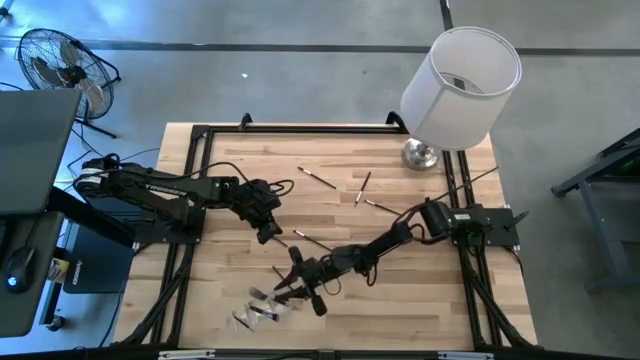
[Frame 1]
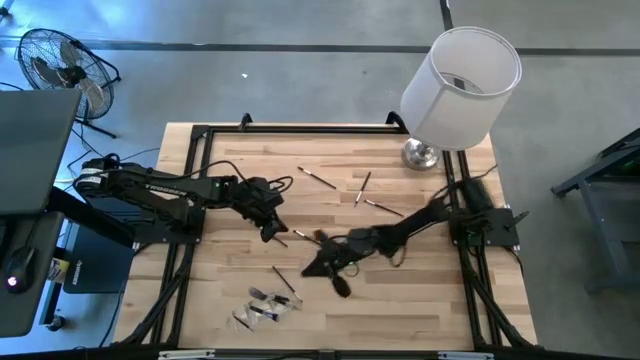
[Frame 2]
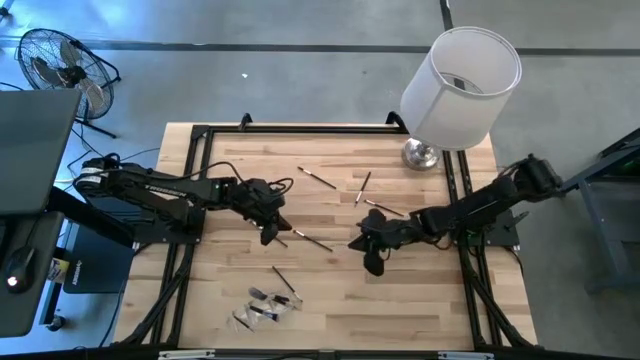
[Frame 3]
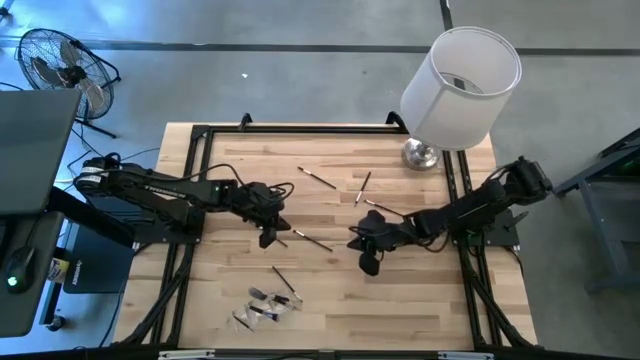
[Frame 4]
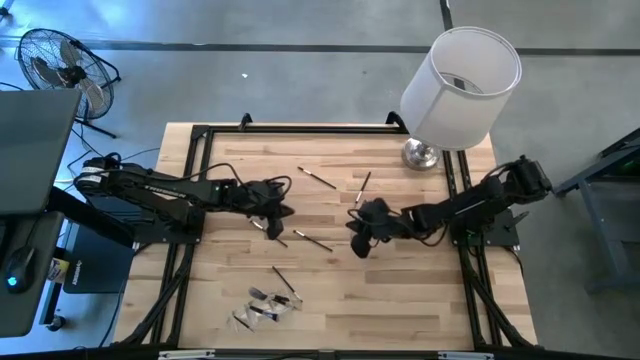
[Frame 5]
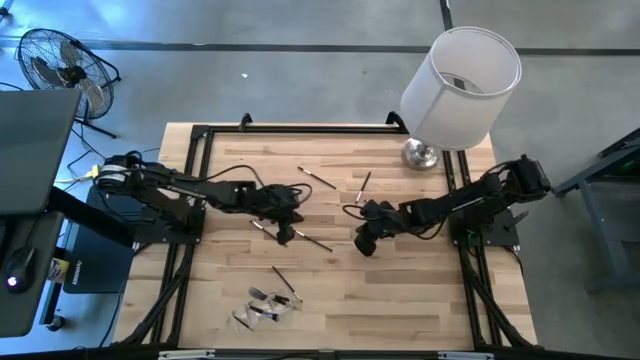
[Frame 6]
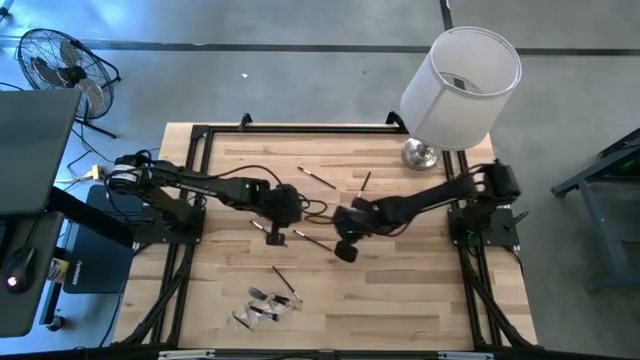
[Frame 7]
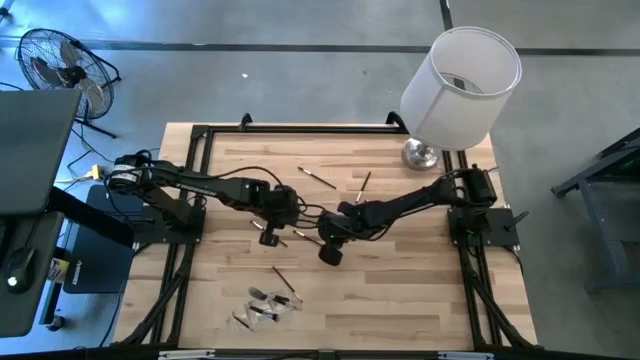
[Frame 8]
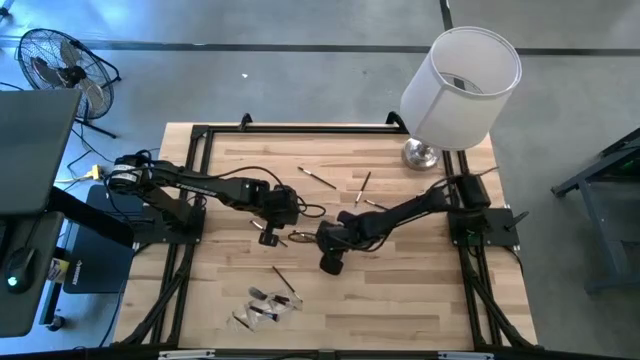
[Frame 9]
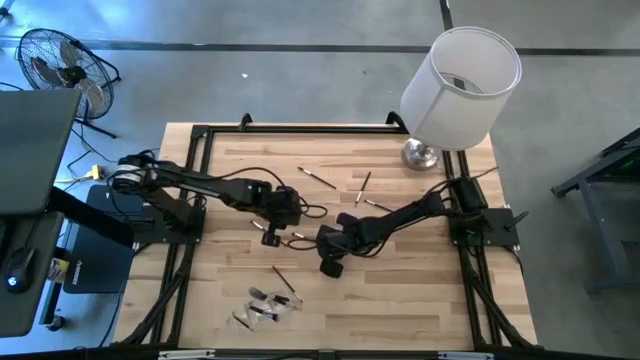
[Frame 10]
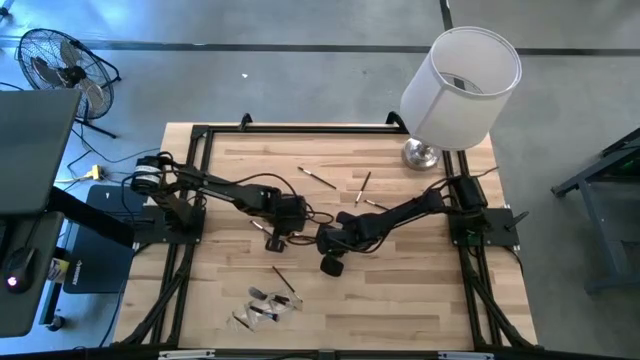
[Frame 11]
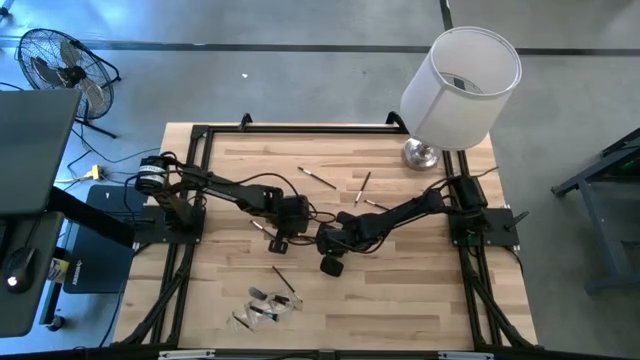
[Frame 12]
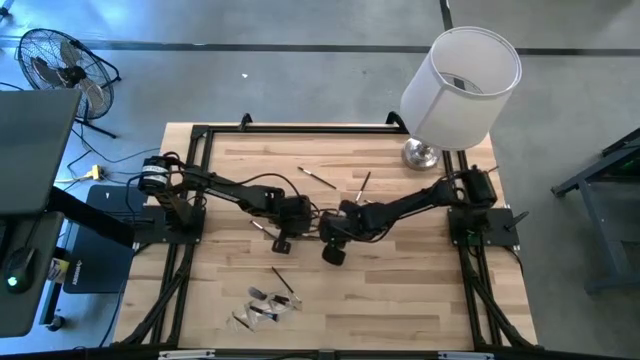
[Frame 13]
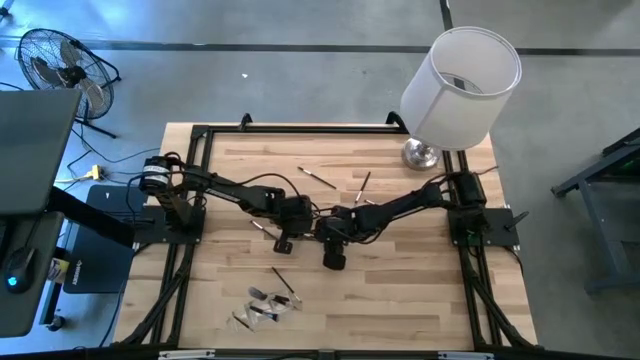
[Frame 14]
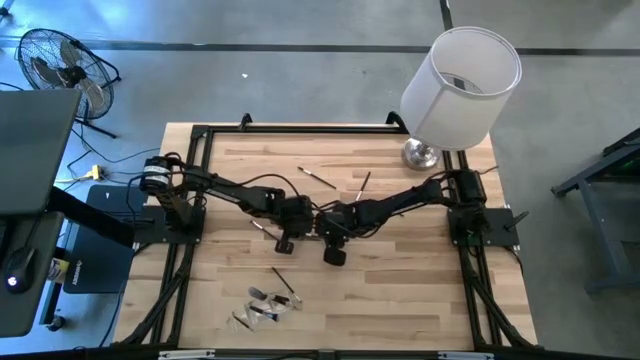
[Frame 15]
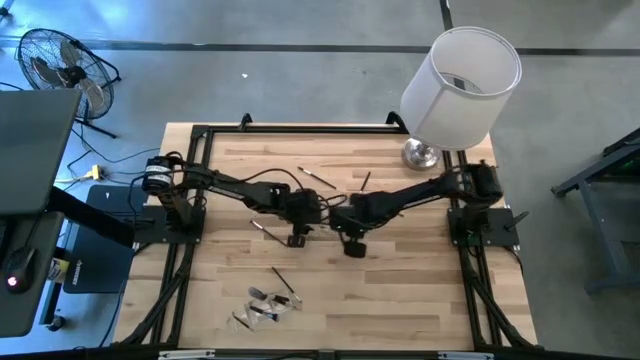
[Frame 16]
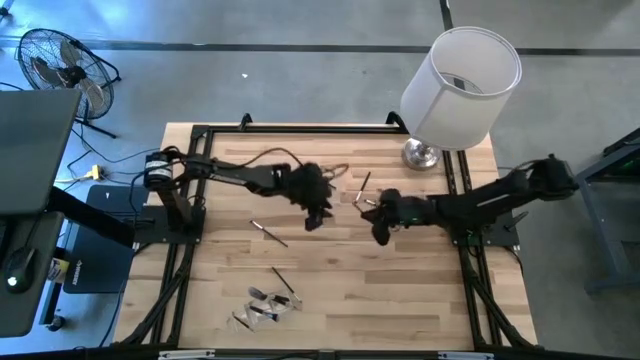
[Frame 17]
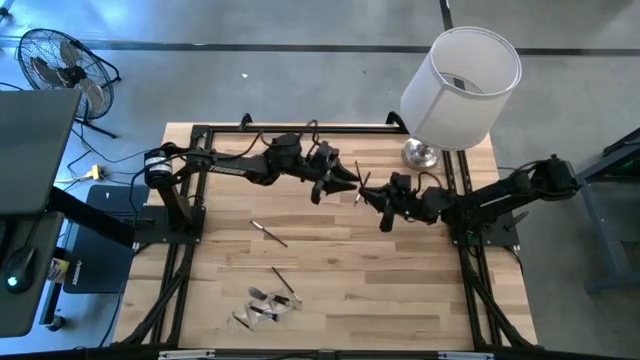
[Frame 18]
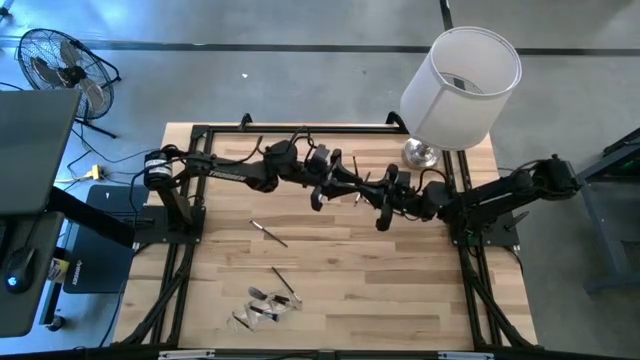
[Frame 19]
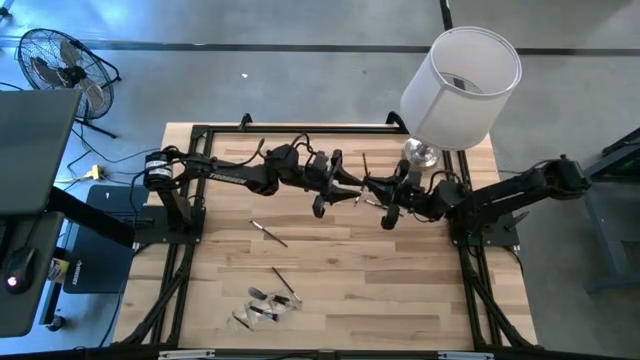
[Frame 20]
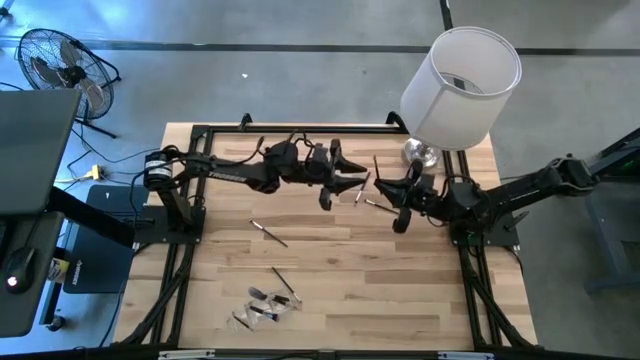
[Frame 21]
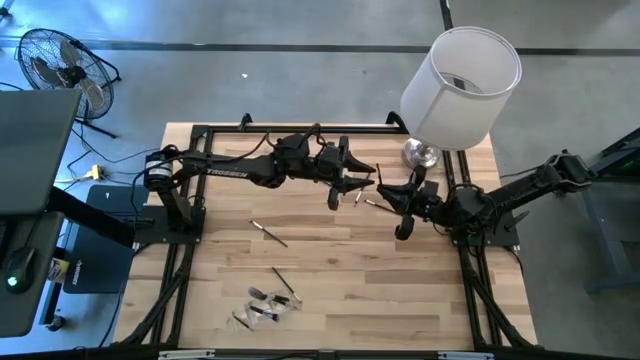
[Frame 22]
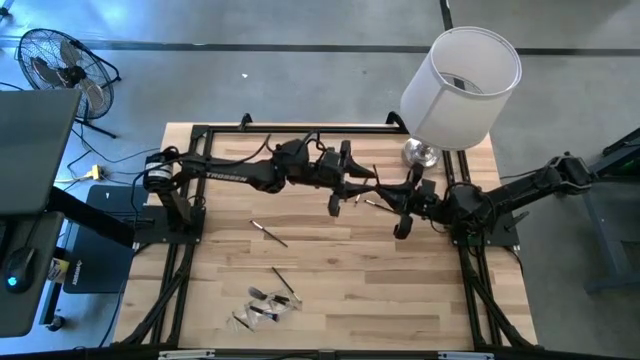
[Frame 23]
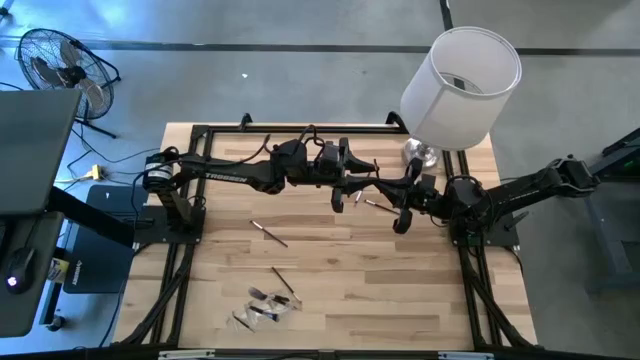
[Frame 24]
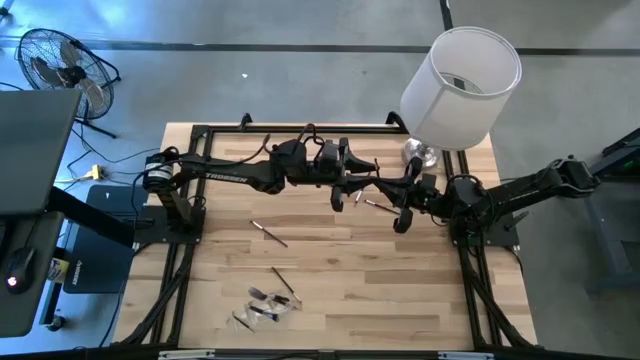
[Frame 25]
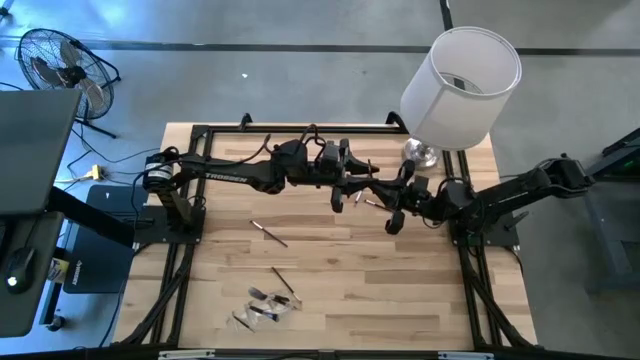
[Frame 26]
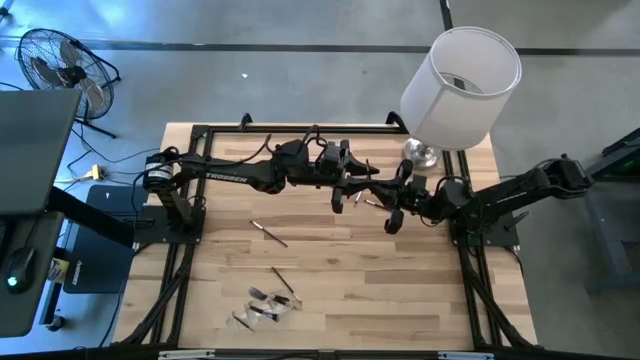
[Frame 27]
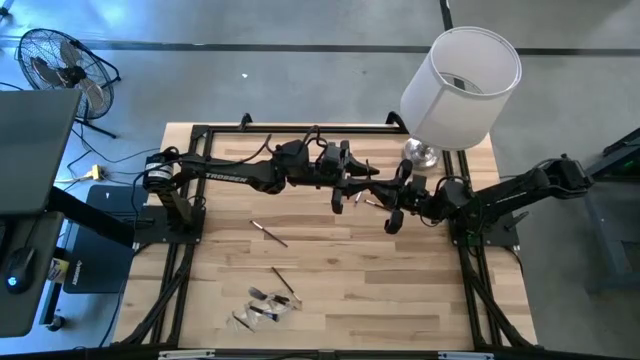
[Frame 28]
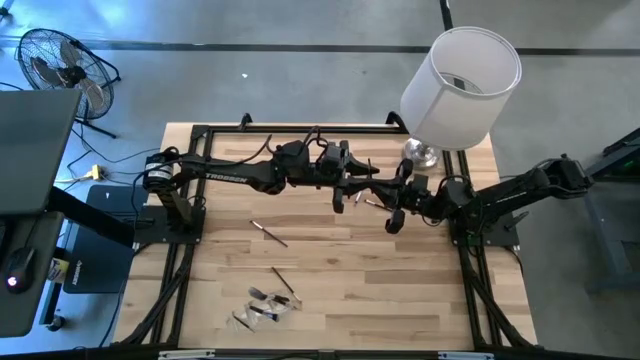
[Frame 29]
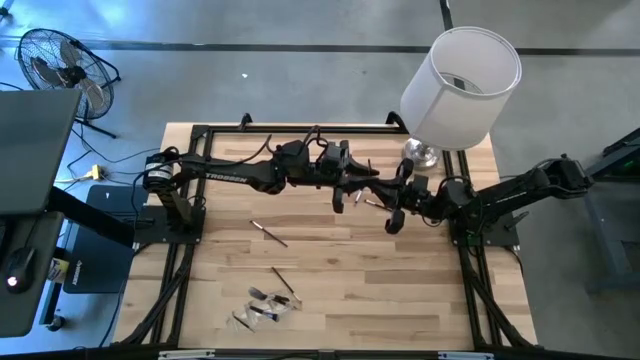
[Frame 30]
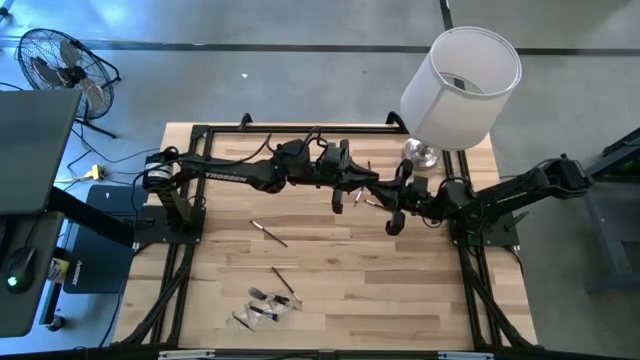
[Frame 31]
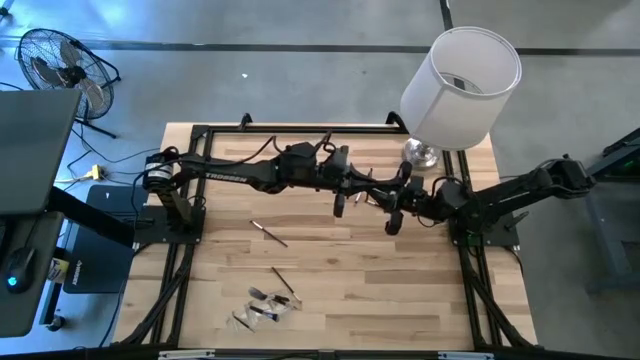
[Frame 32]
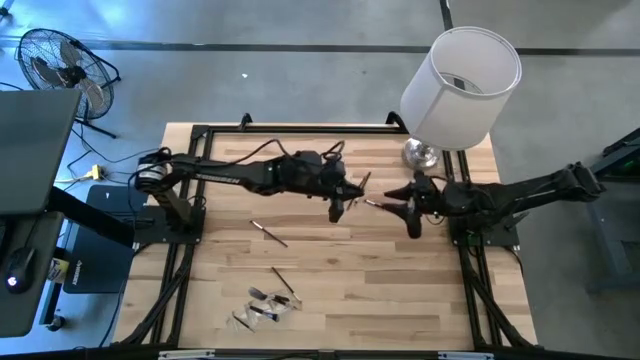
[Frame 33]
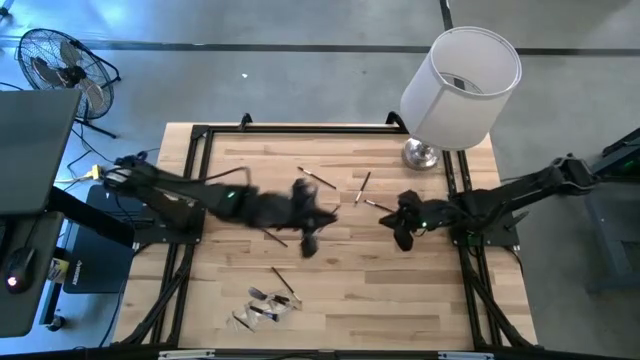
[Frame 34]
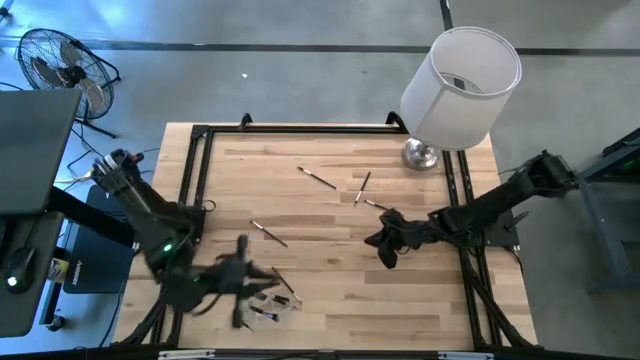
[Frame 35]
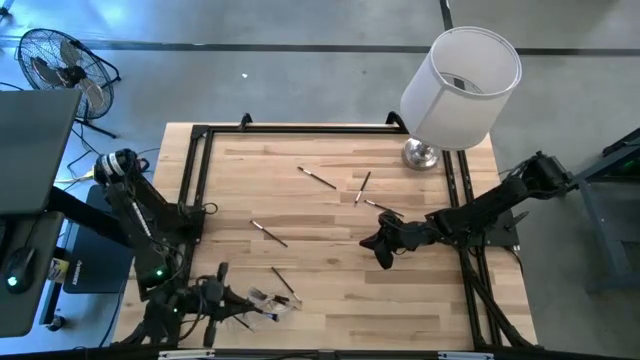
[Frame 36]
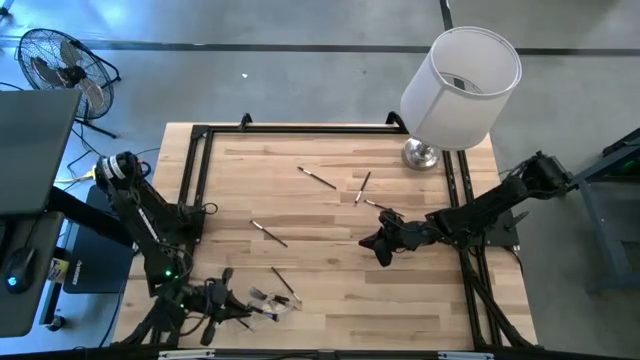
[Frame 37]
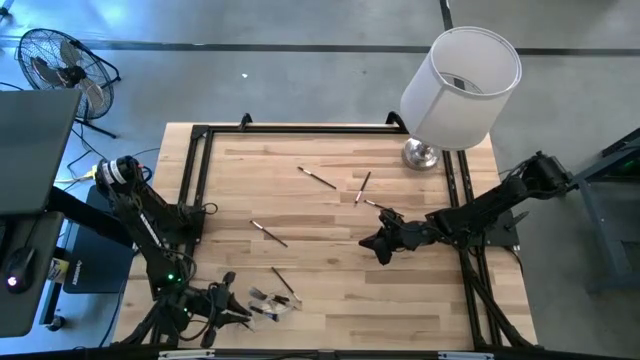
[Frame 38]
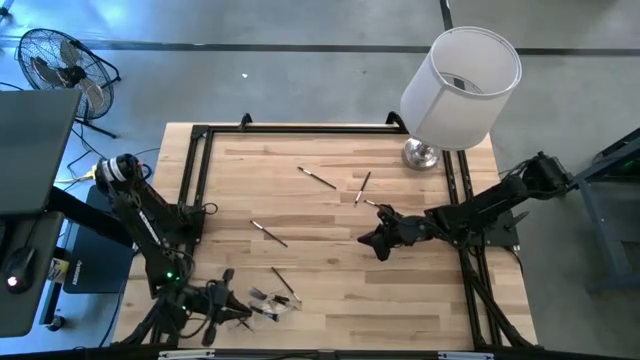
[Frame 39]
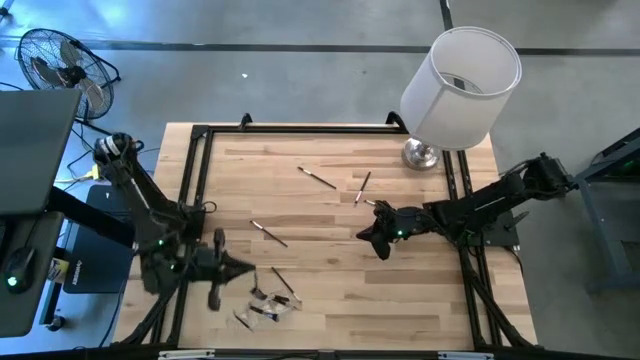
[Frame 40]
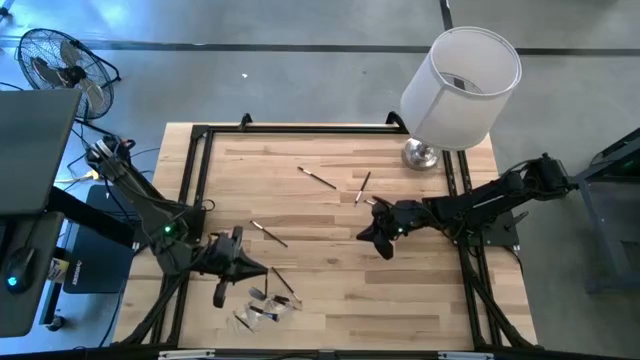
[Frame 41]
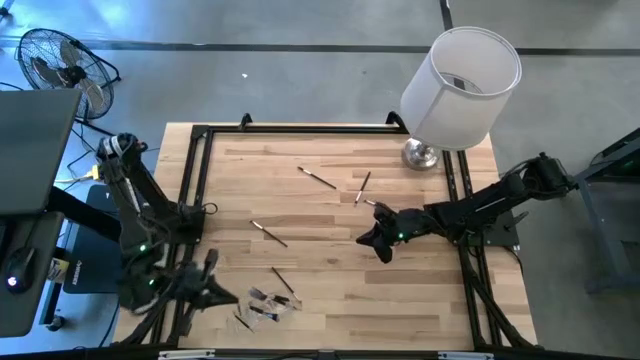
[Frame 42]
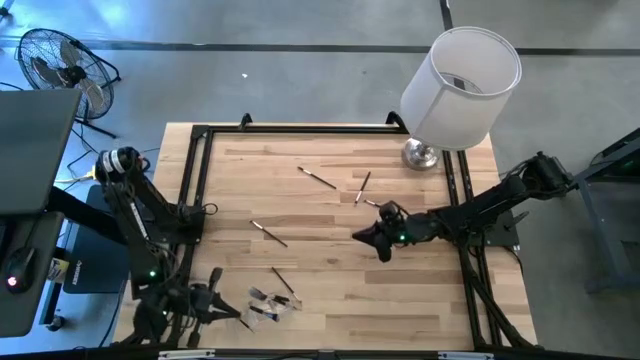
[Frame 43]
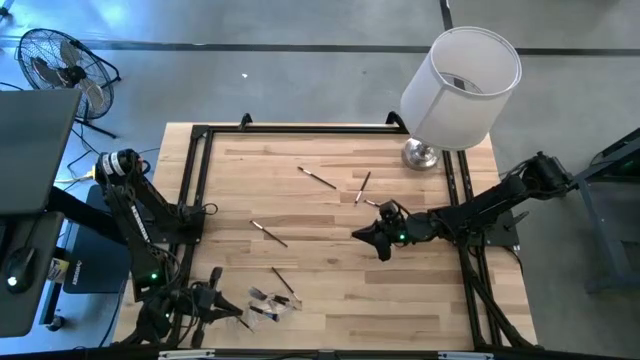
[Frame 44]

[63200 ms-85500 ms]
Task: Pick & Place Makeup Supplies
Put the silver makeup brush into the transparent organizer
